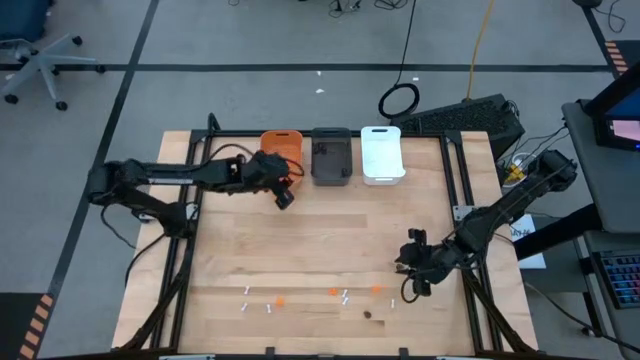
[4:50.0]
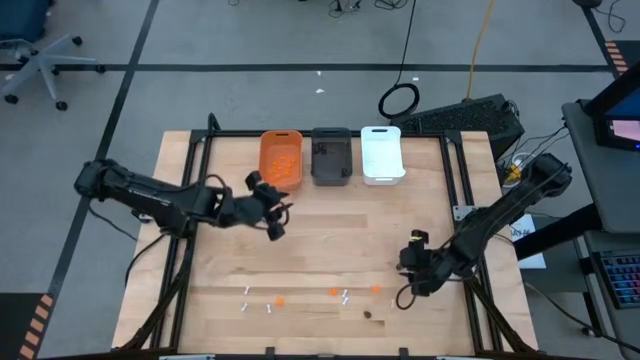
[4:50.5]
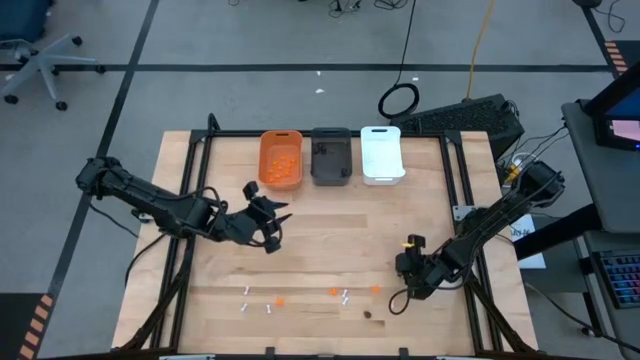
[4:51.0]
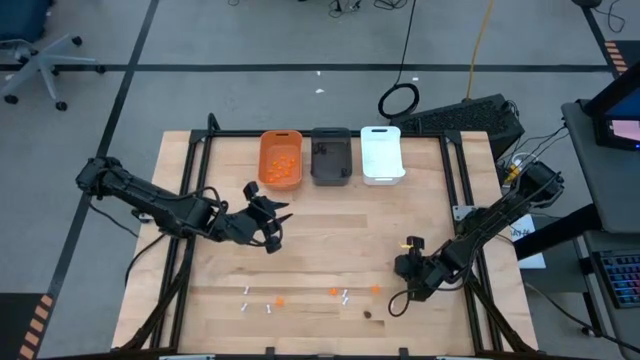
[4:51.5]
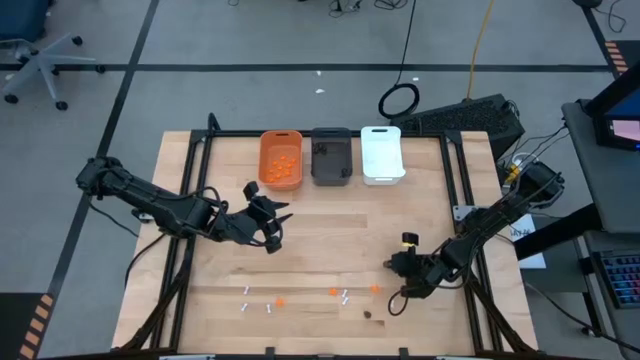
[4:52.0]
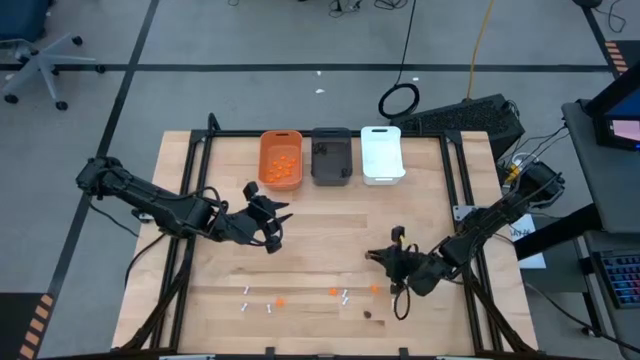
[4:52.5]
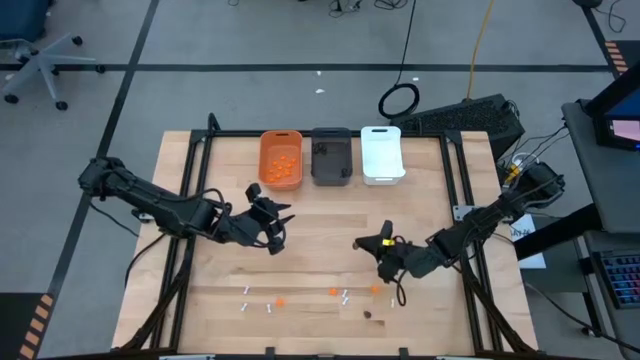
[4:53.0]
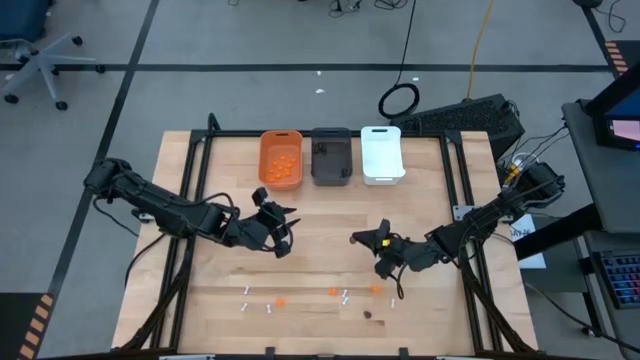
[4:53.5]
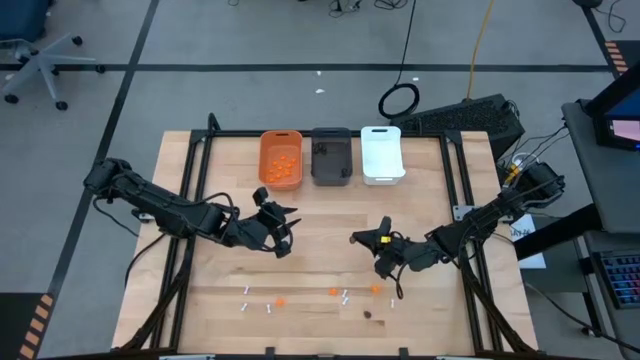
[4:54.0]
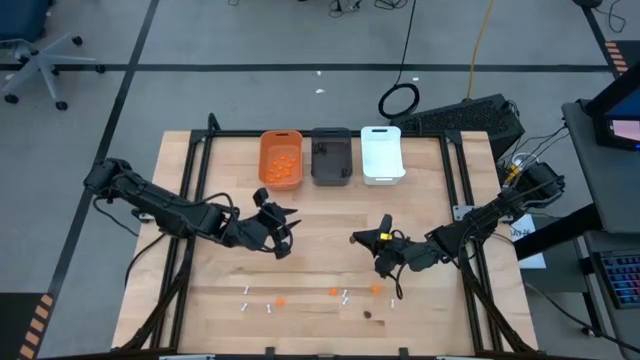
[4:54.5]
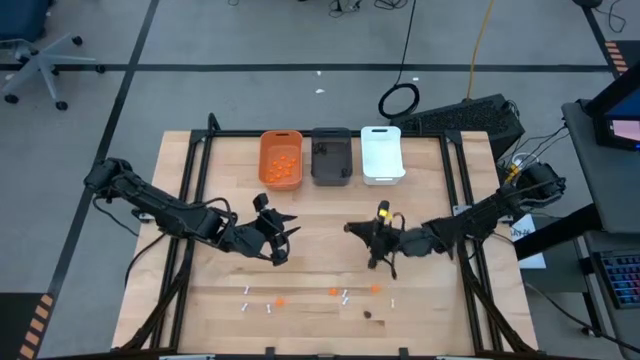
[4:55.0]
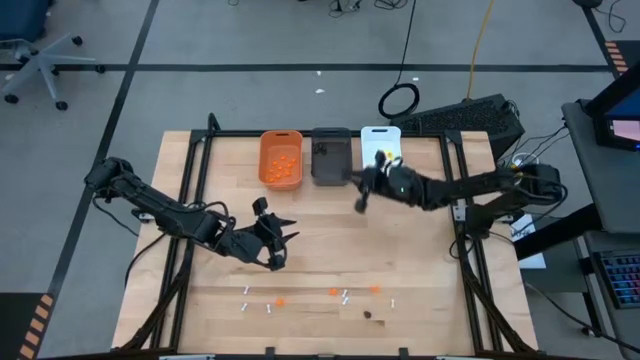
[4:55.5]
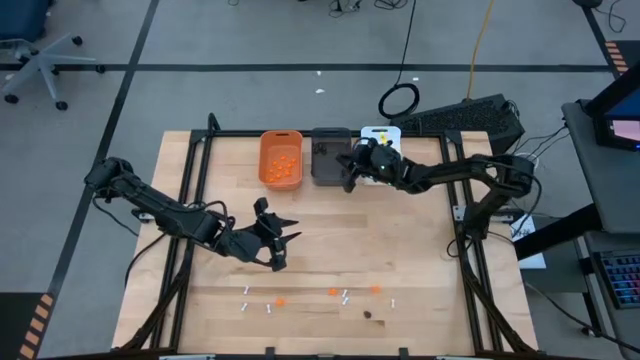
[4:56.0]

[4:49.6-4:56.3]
Task: Sort Halloween decoration
Put the black skull toy into the black bin

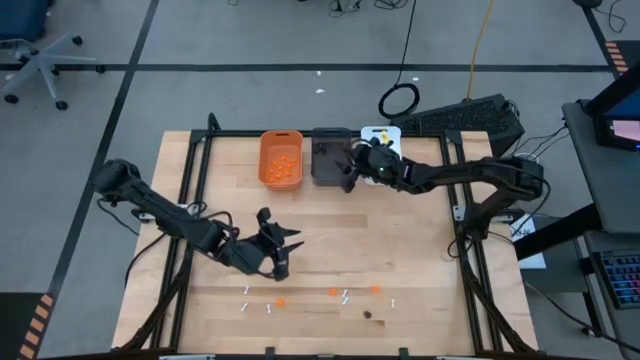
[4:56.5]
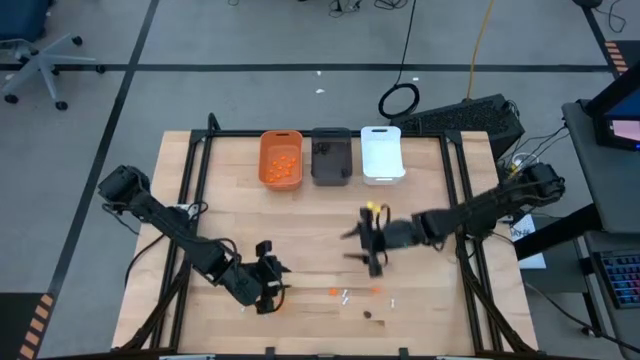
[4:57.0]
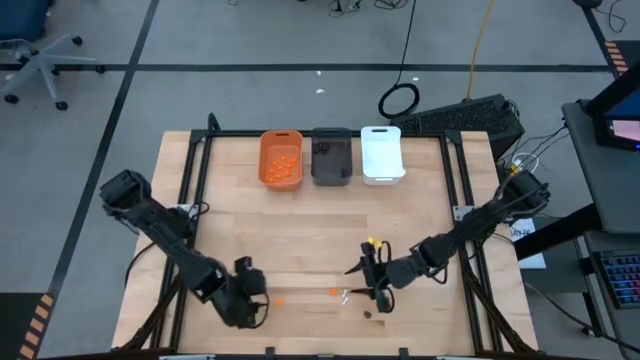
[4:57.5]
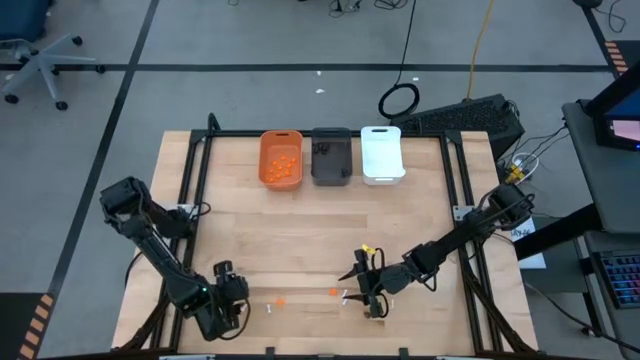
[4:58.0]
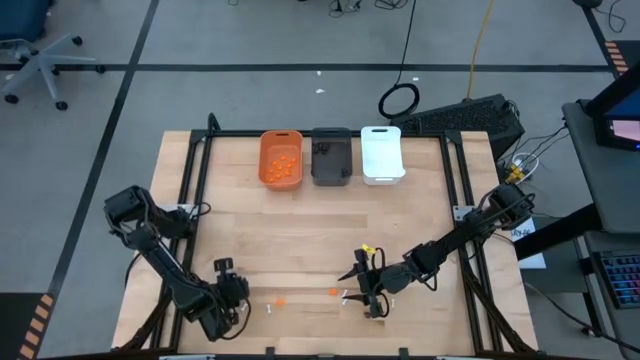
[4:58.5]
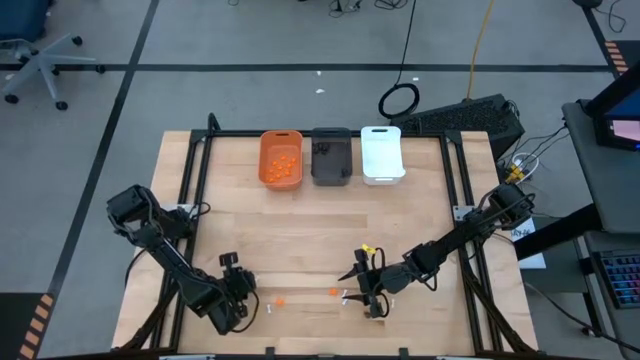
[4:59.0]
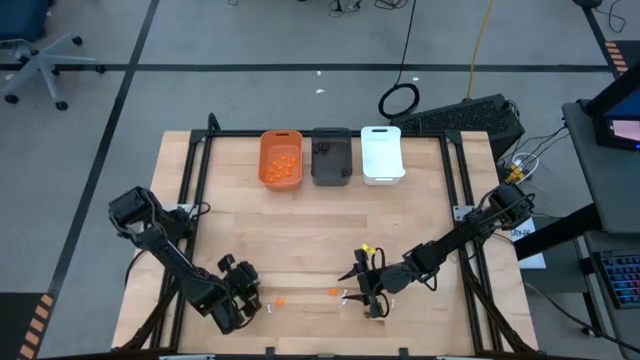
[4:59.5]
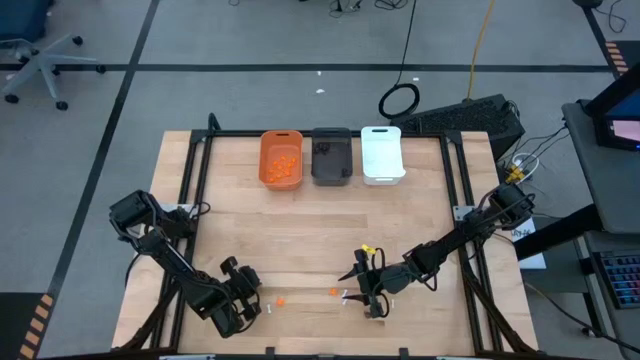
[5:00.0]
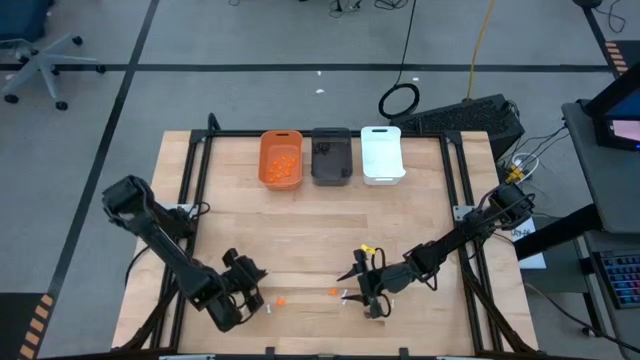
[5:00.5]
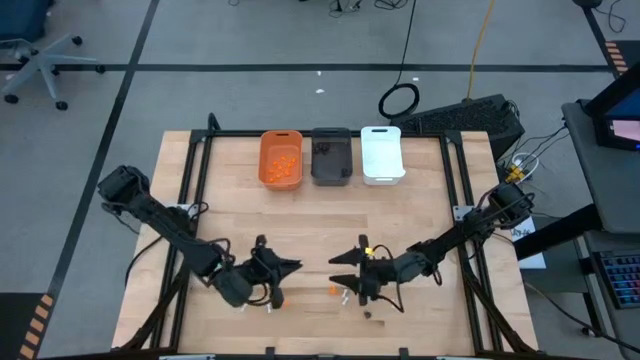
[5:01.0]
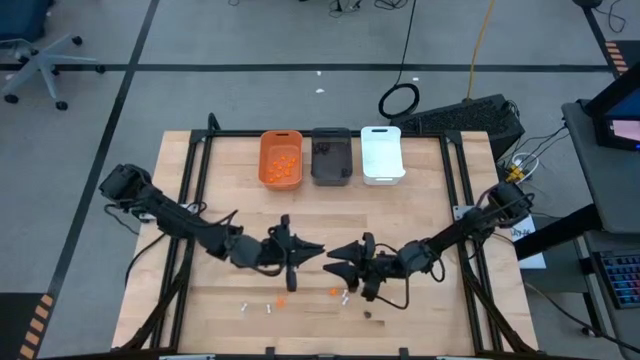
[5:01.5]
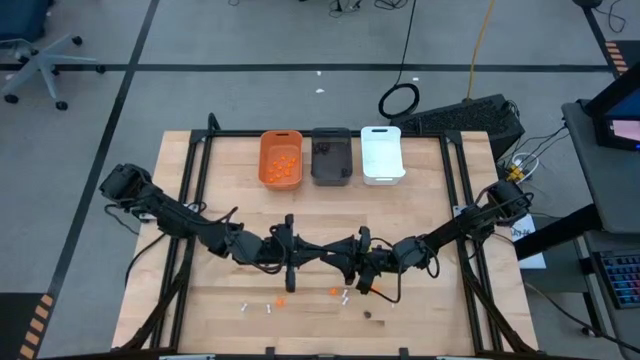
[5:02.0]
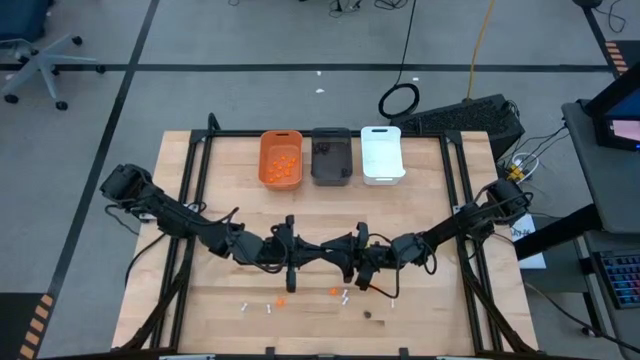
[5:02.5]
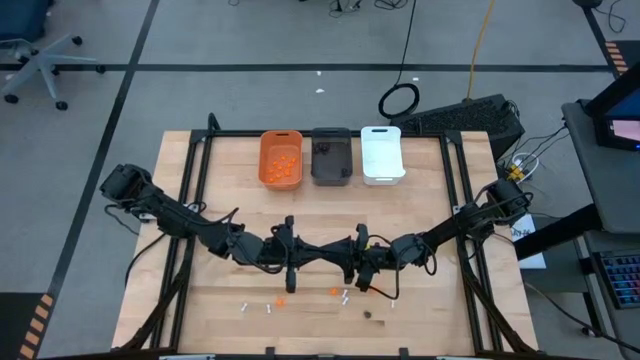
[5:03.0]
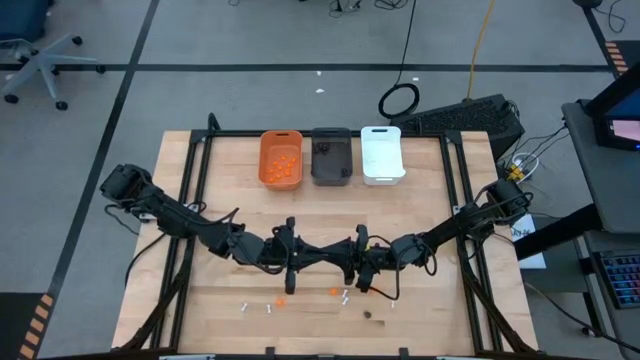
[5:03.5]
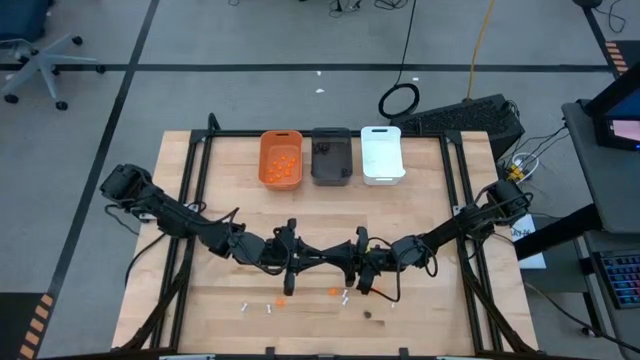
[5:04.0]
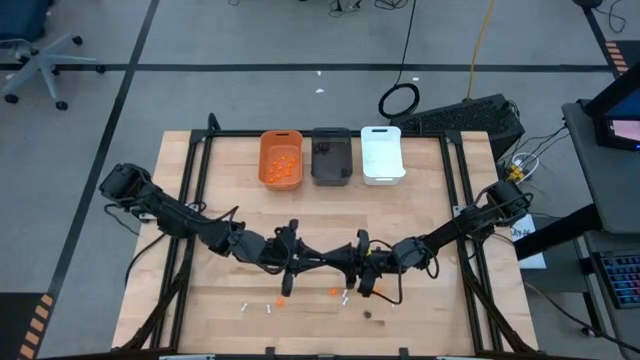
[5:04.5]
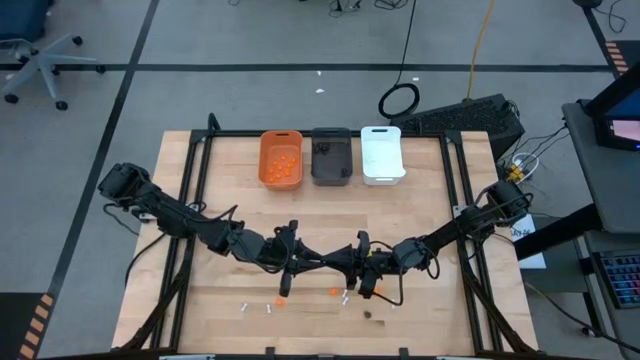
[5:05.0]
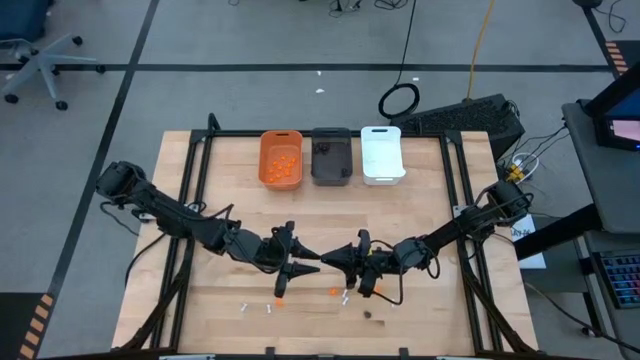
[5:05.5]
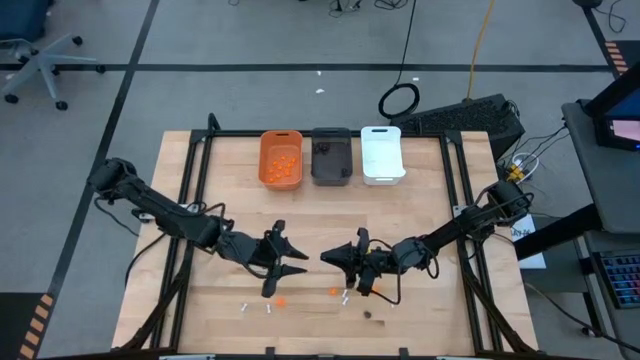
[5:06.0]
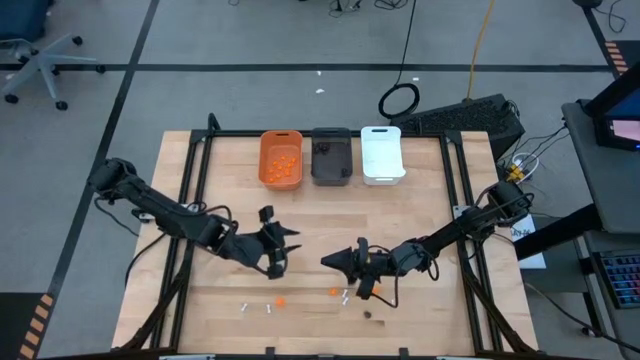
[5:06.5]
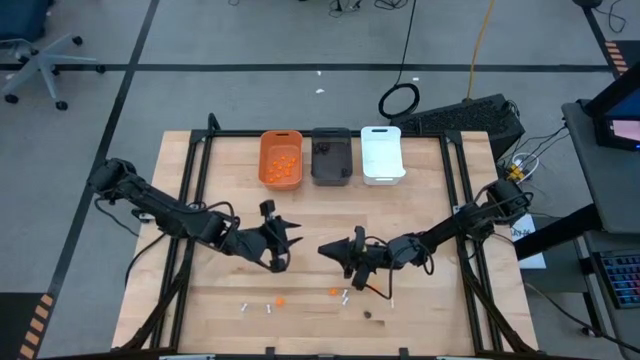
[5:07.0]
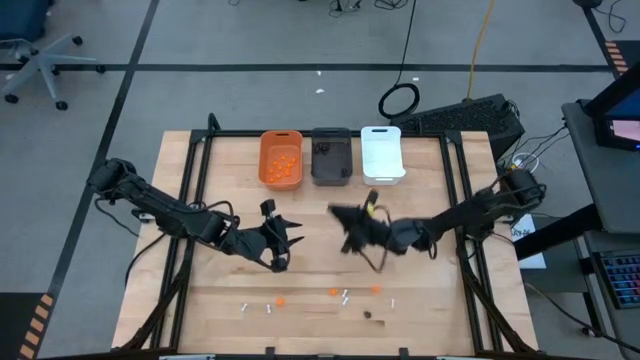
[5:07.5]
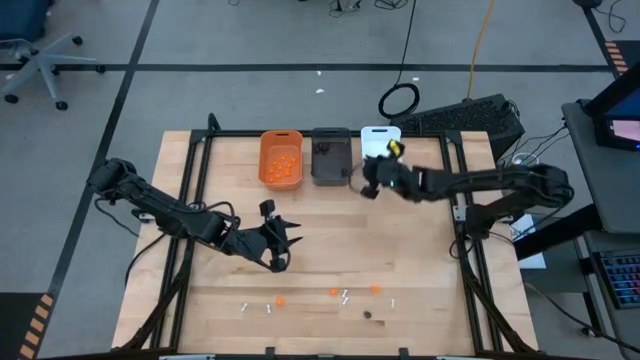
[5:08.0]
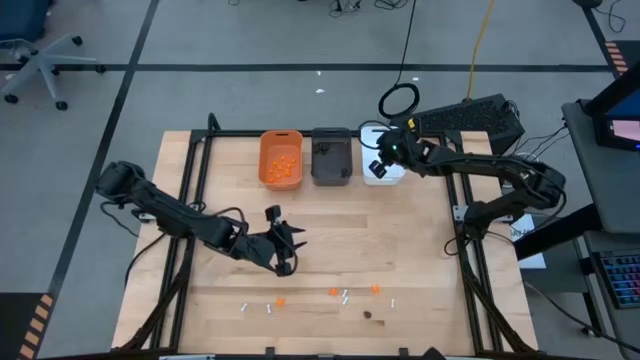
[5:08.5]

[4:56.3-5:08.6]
Put the white bone toy into the white bin
